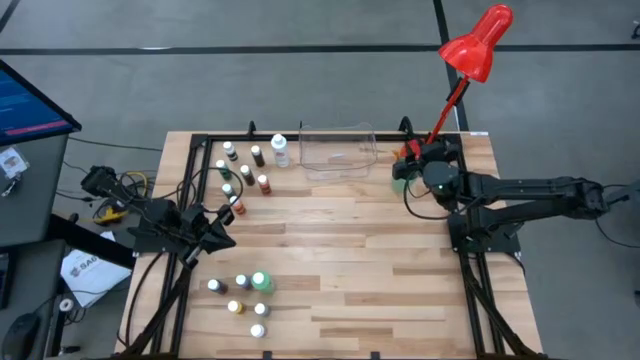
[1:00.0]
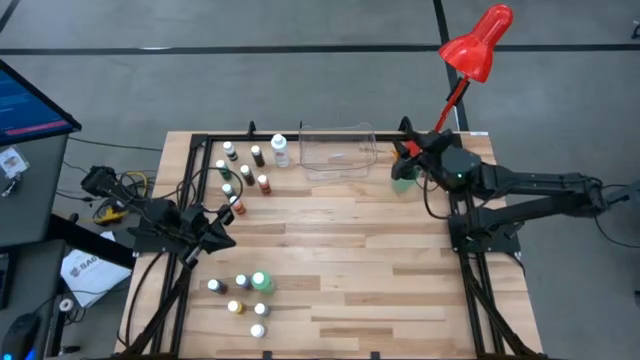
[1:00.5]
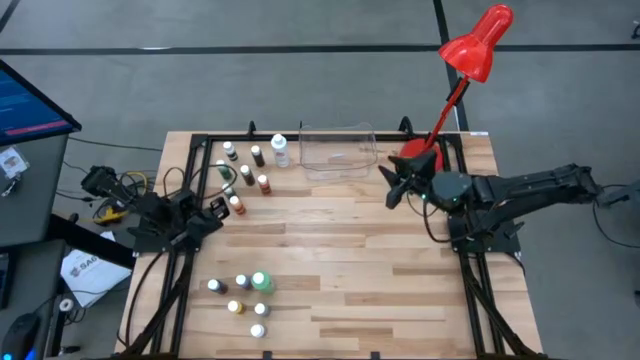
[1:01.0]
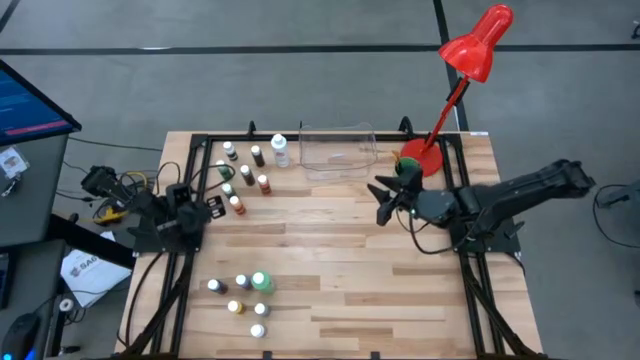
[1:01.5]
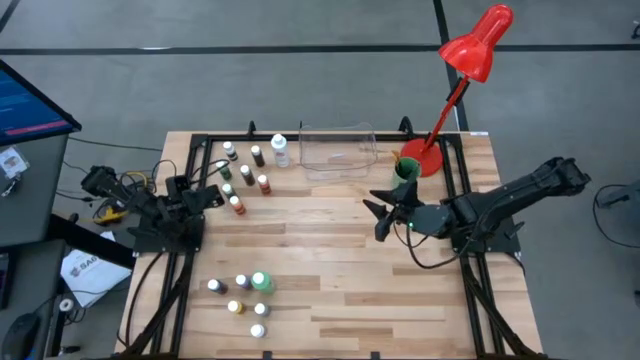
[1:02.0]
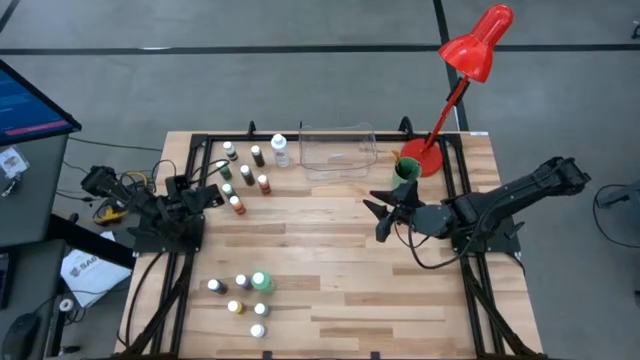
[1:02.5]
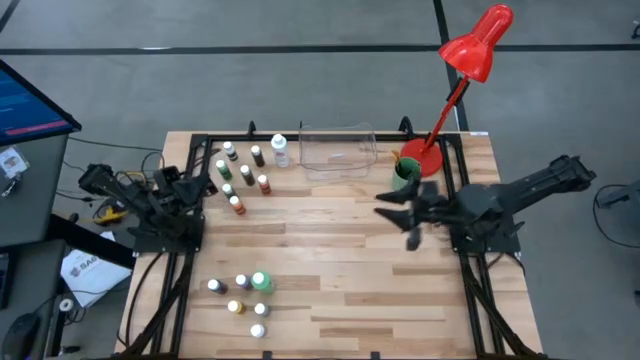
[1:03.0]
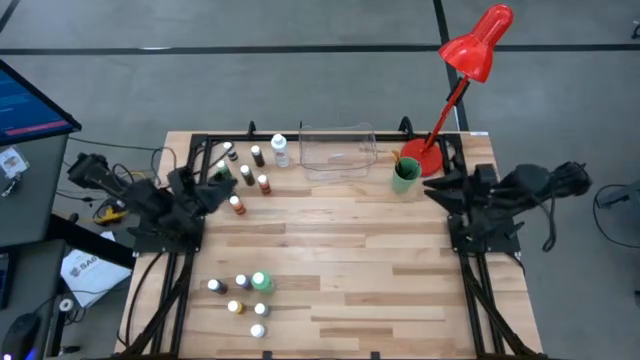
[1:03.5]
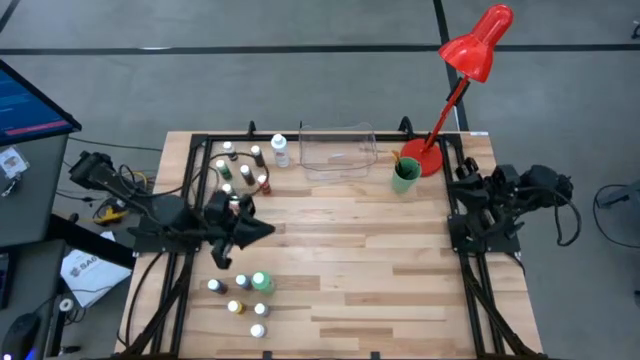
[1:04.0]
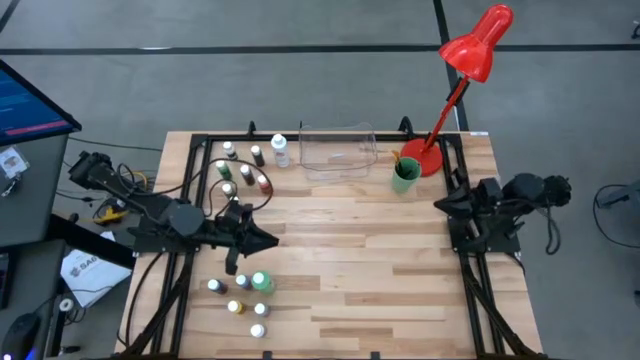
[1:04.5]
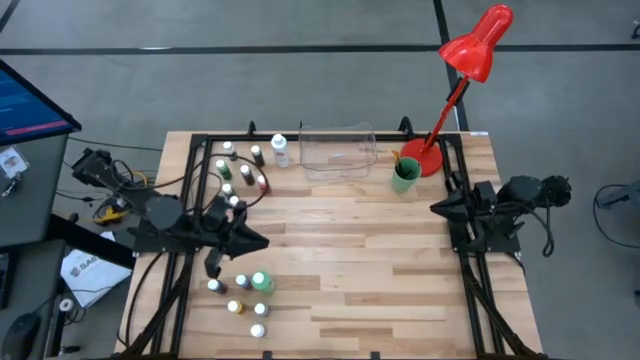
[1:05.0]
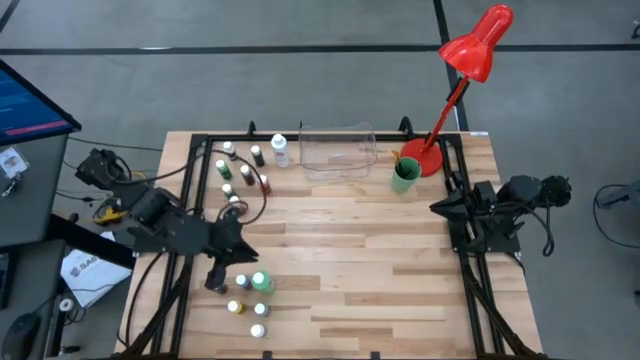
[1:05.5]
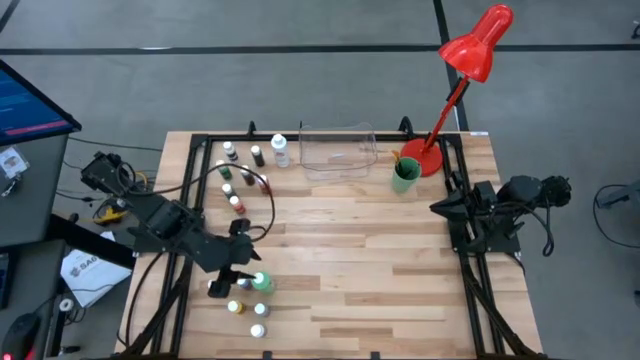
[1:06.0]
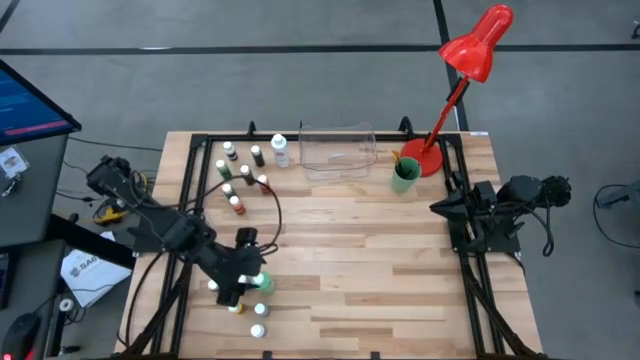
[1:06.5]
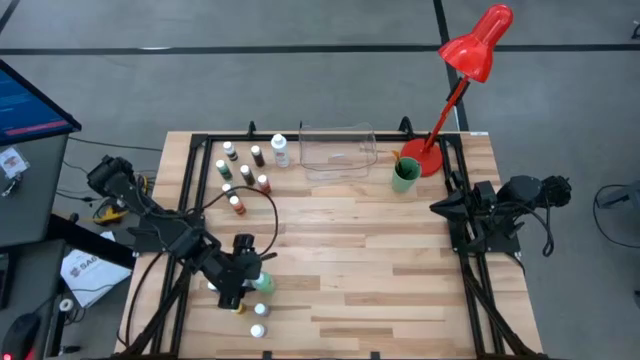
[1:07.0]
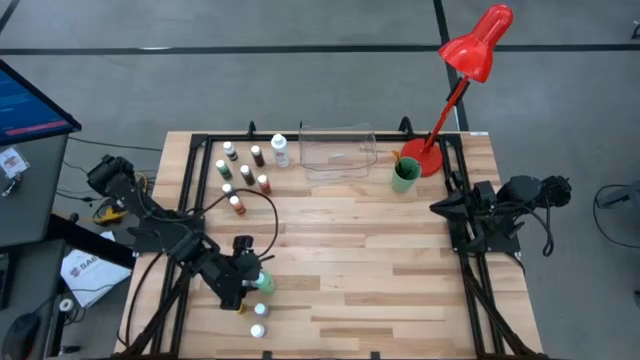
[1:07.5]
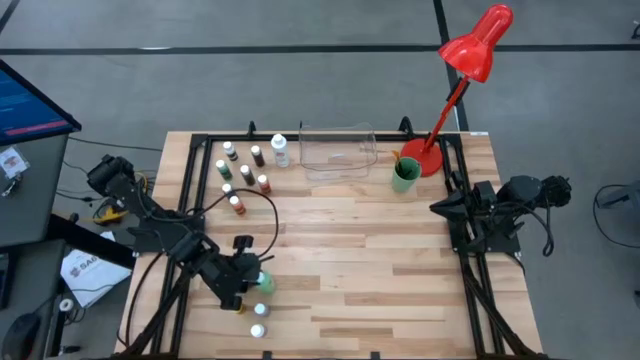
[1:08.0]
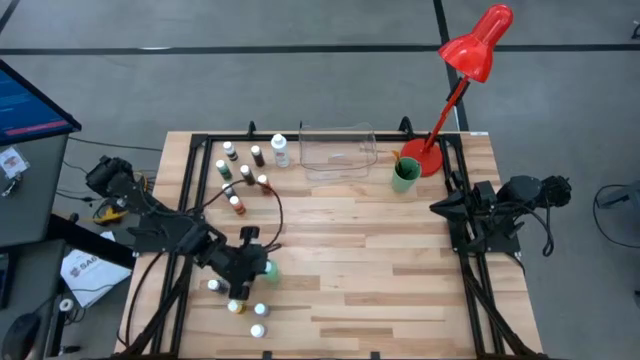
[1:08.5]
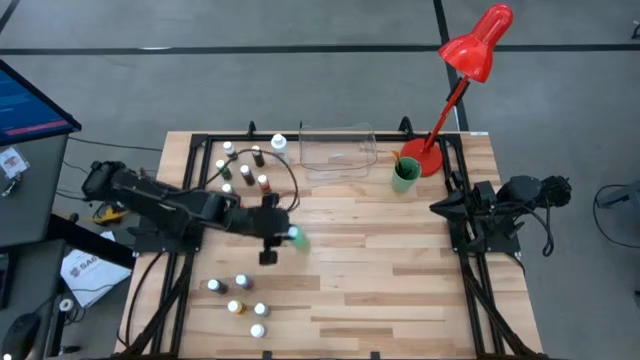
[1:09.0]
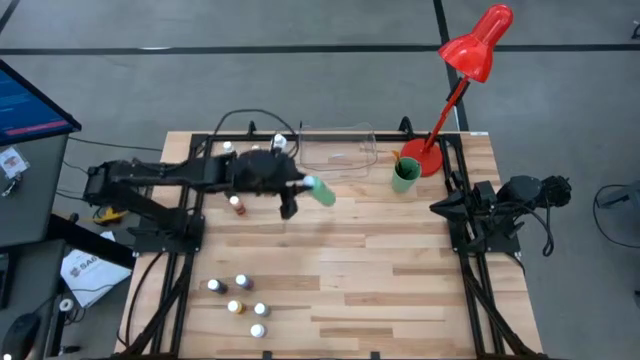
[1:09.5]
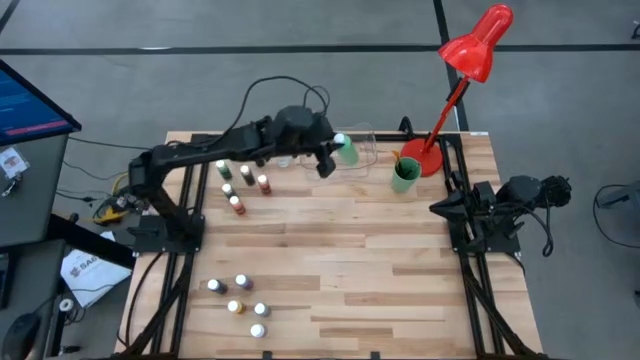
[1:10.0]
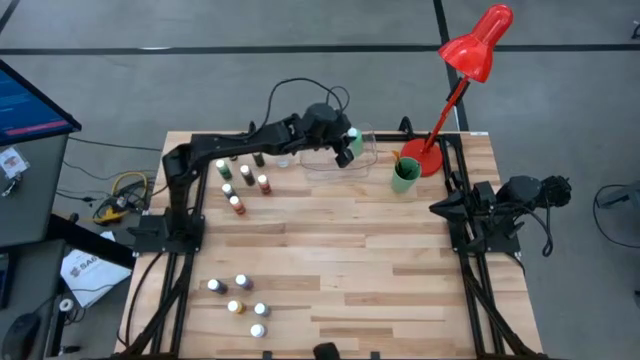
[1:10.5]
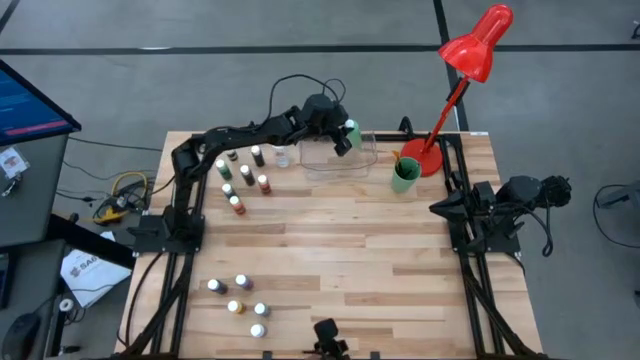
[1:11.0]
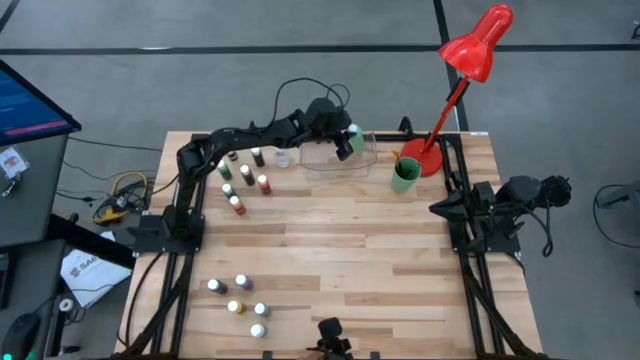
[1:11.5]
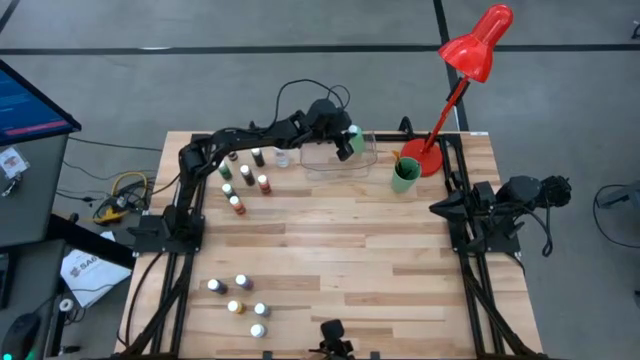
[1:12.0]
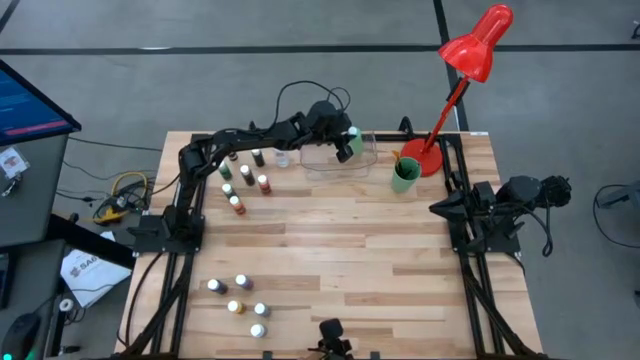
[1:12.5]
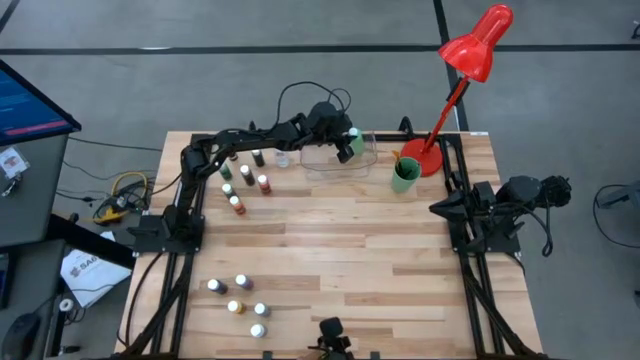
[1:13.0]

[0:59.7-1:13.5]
Task: Pick & Place Paint Supplies
Put the large green paint bottle into the transparent bin

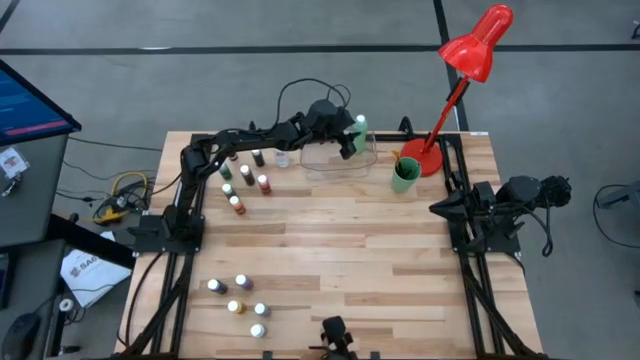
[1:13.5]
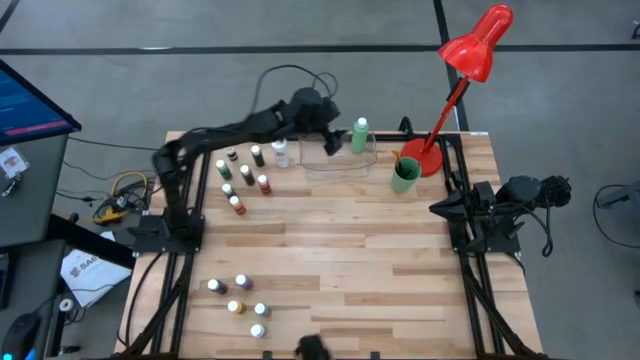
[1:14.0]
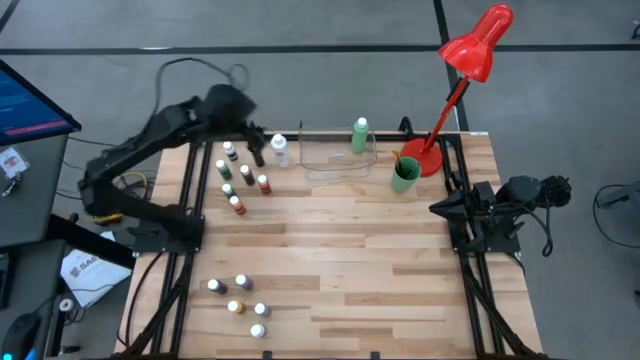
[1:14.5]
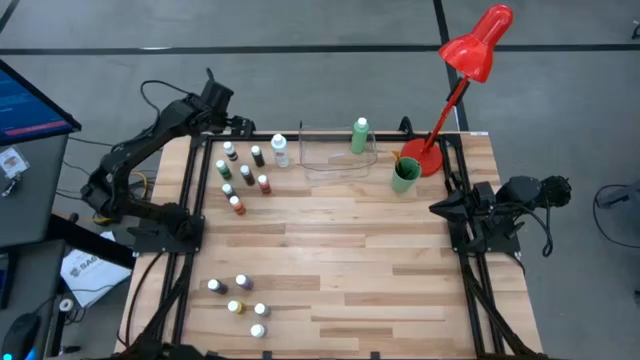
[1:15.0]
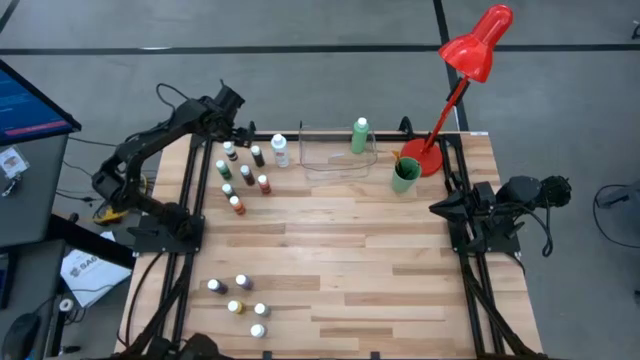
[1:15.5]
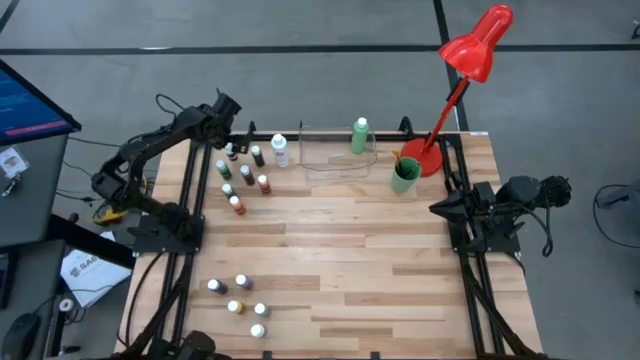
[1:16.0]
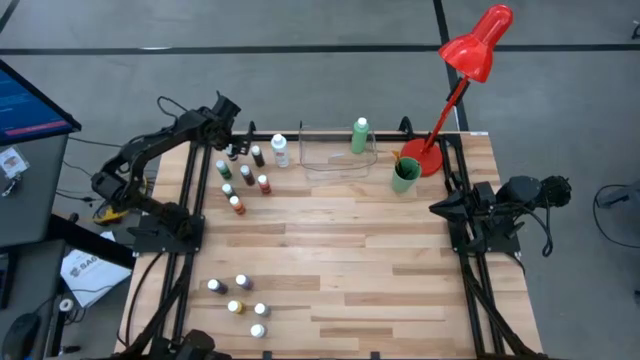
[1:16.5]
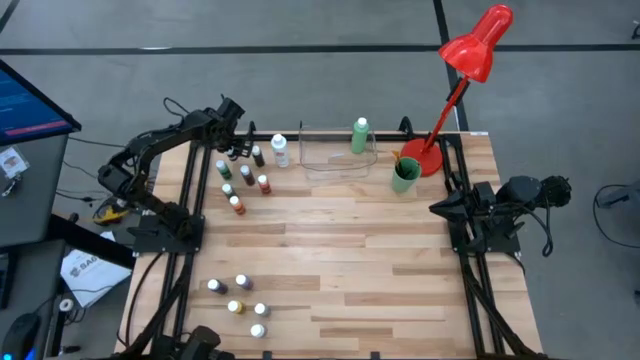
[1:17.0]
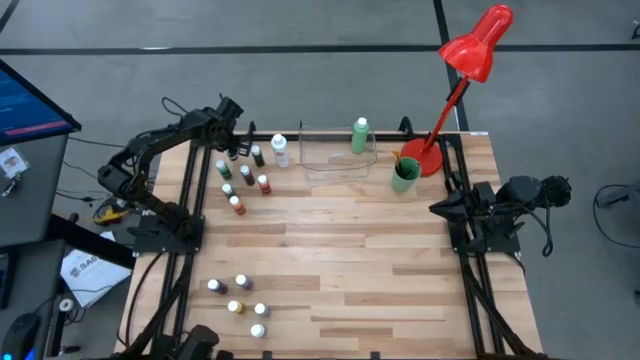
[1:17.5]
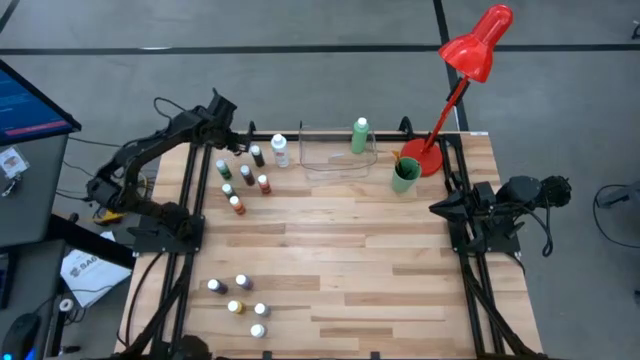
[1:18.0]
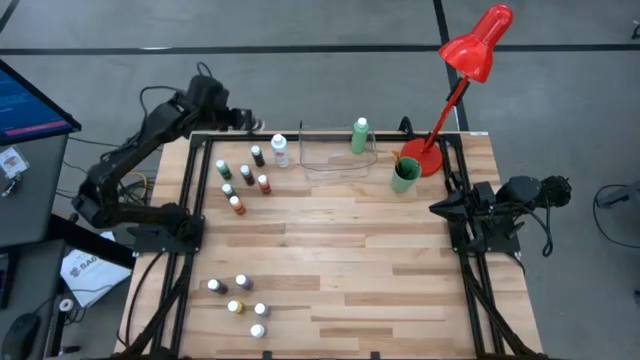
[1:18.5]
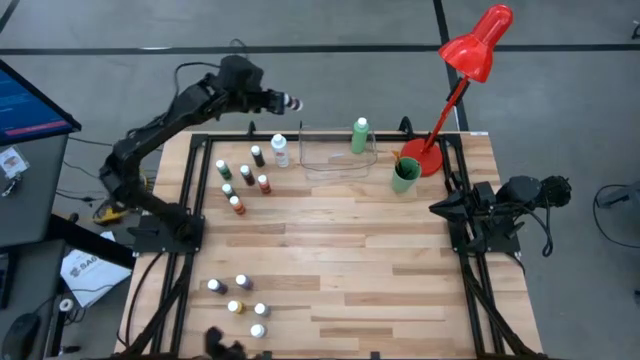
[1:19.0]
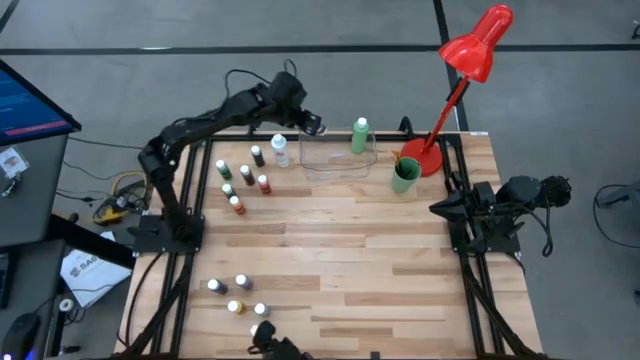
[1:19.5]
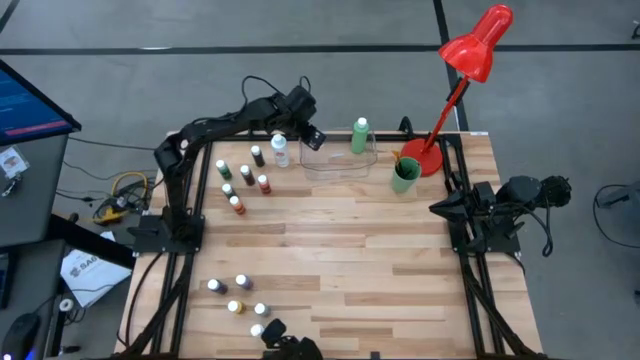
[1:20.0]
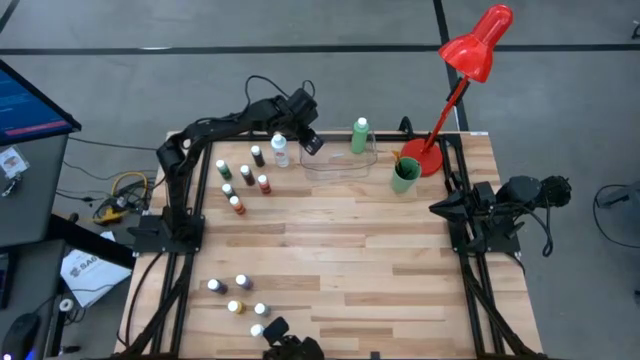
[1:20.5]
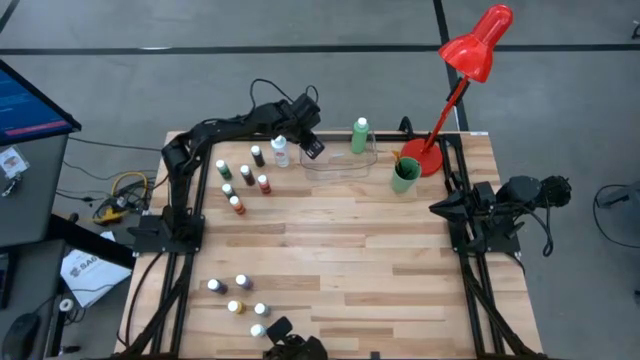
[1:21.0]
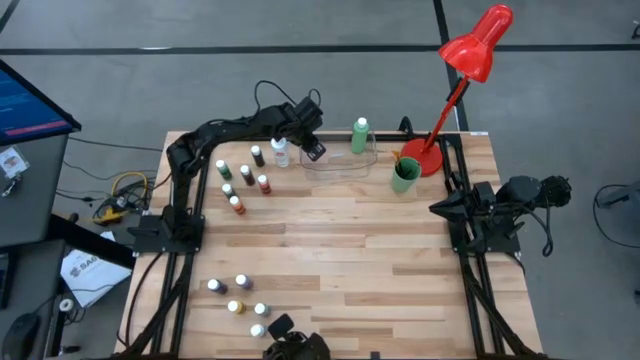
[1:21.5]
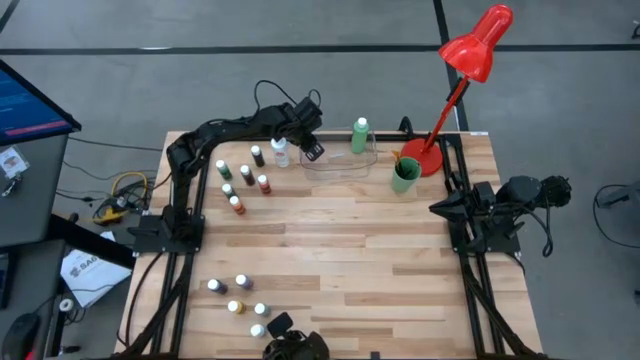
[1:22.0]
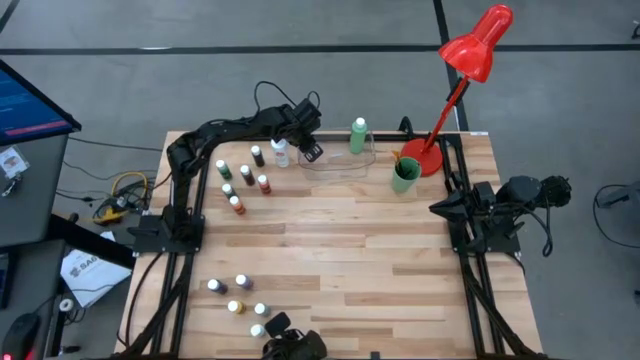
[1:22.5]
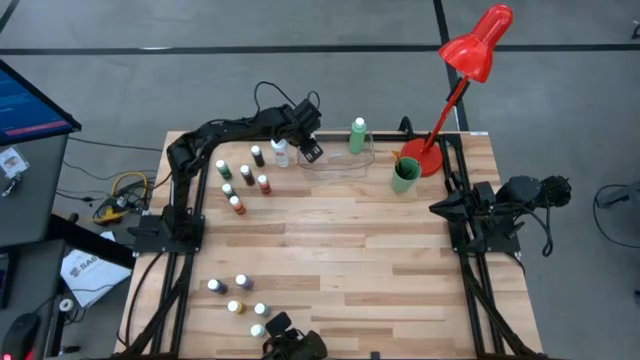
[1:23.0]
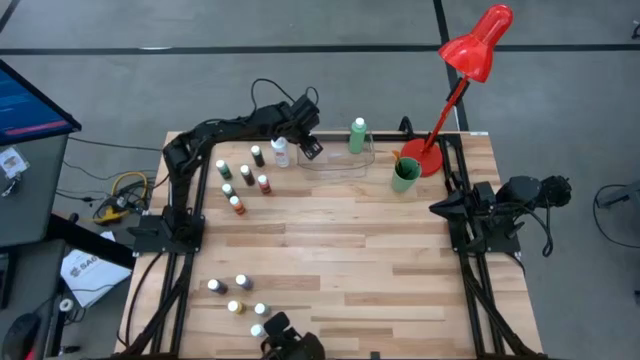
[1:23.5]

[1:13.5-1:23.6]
Put the top small white paint bottle into the transparent bin
